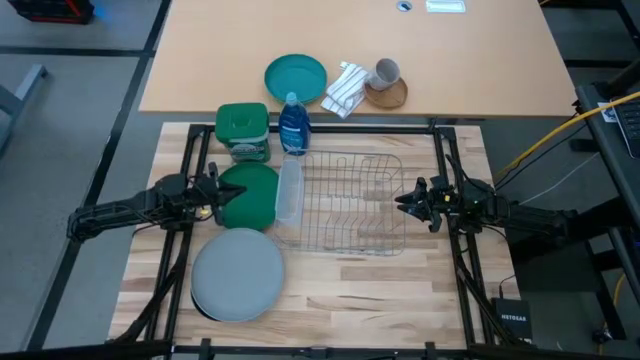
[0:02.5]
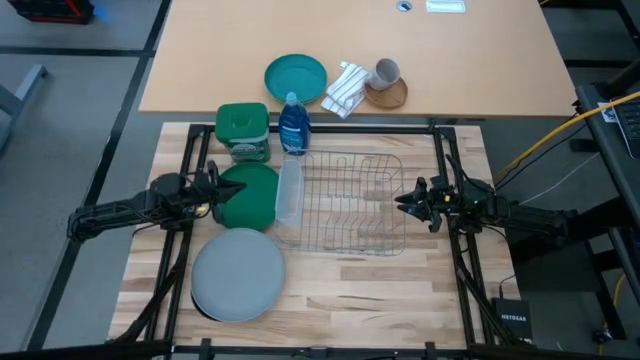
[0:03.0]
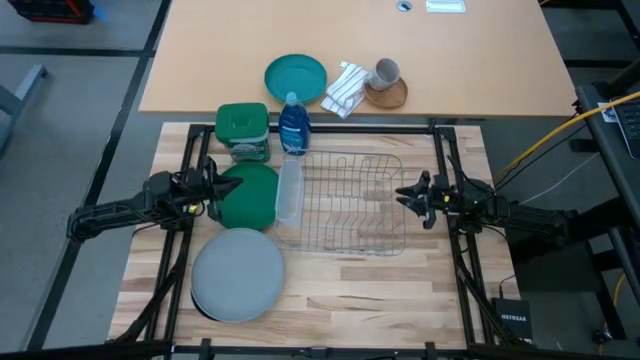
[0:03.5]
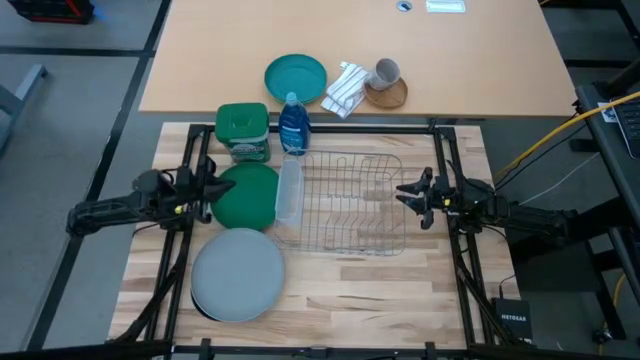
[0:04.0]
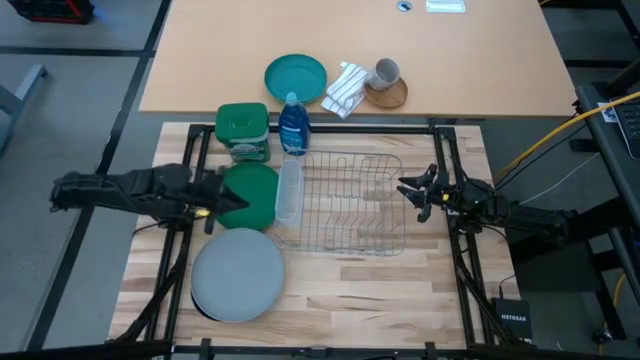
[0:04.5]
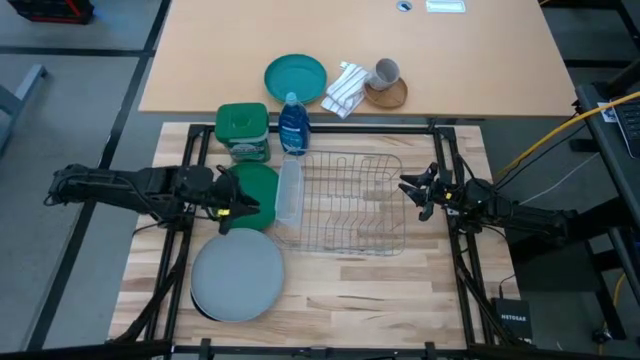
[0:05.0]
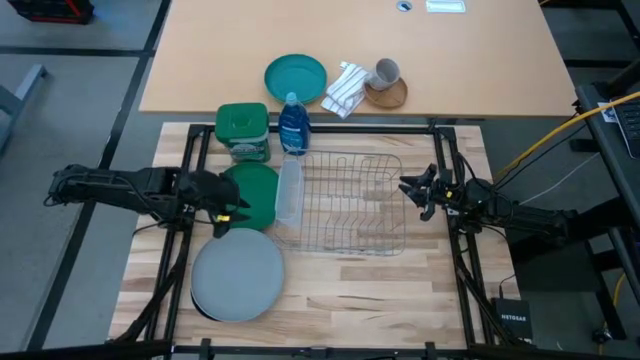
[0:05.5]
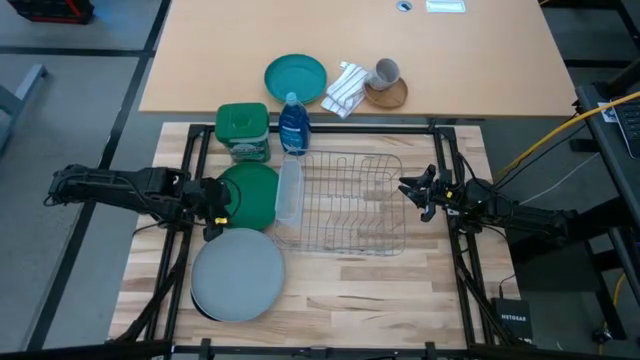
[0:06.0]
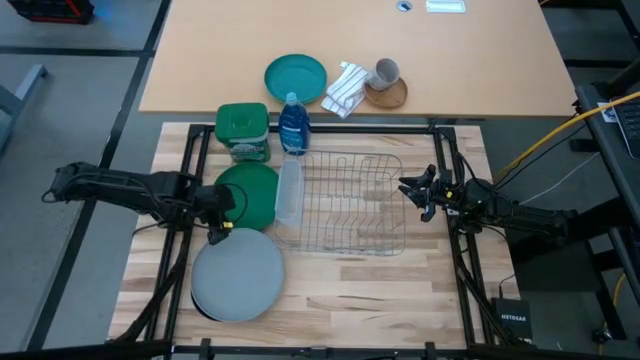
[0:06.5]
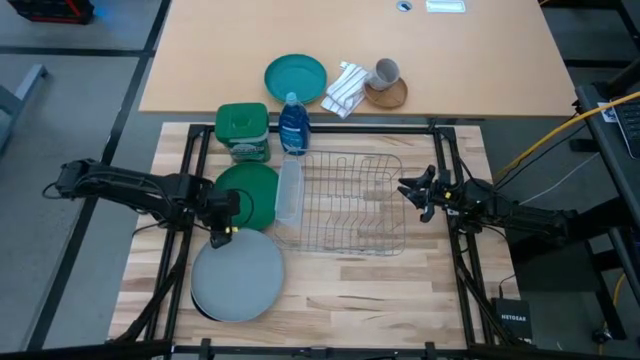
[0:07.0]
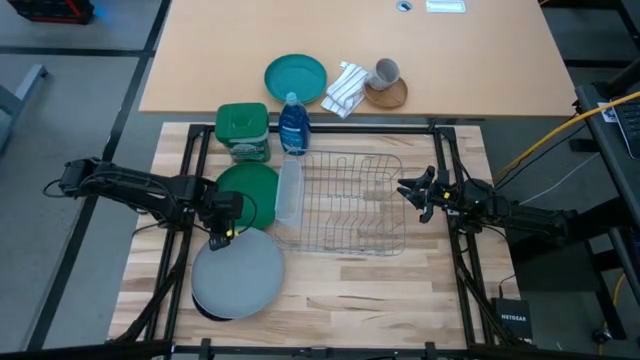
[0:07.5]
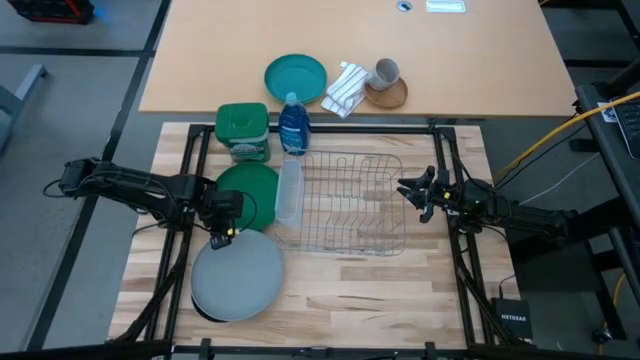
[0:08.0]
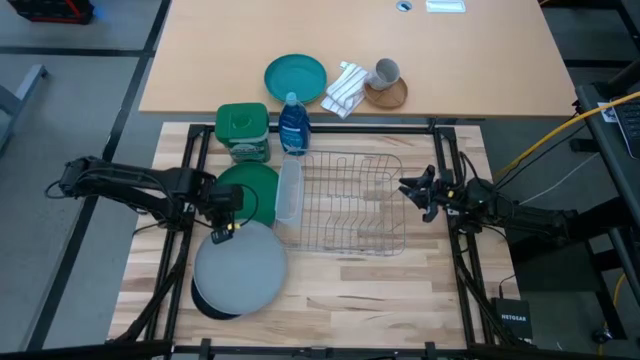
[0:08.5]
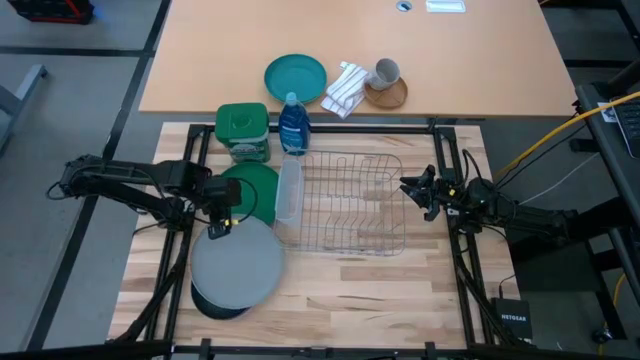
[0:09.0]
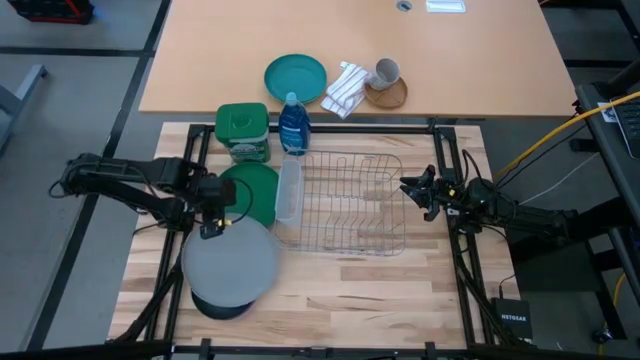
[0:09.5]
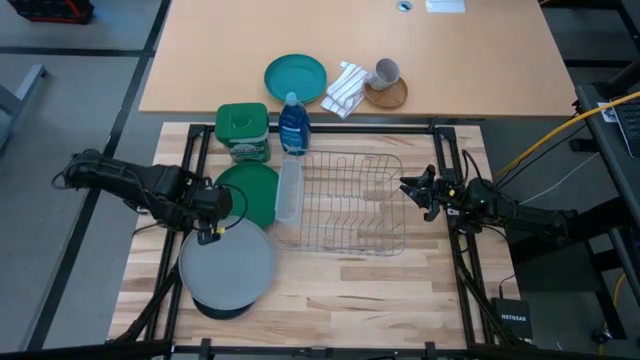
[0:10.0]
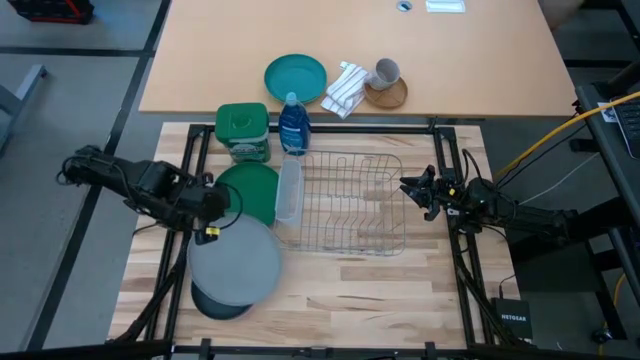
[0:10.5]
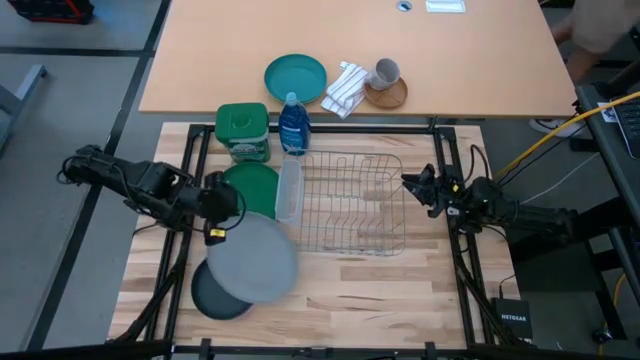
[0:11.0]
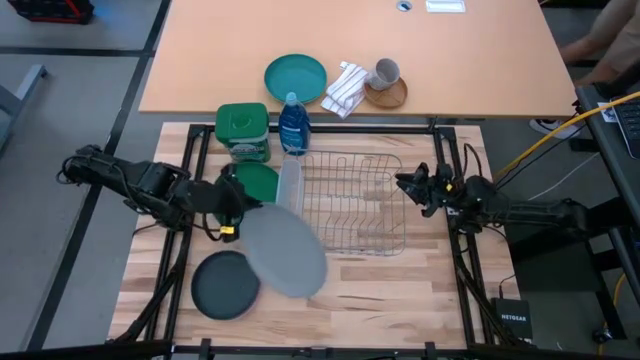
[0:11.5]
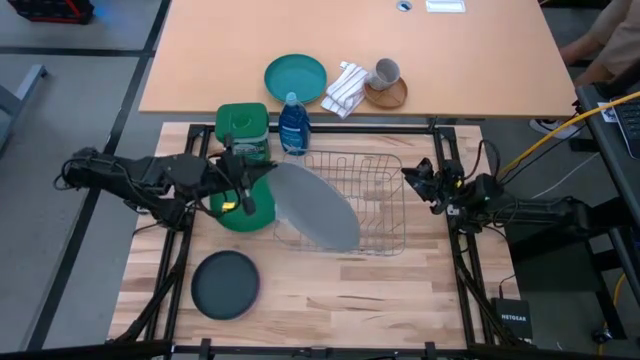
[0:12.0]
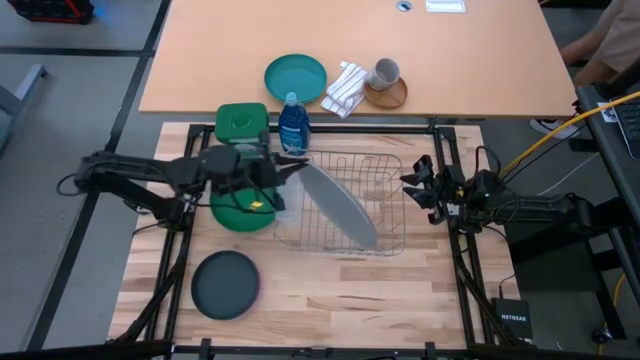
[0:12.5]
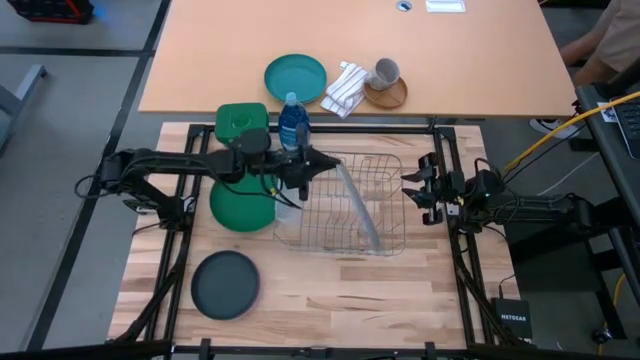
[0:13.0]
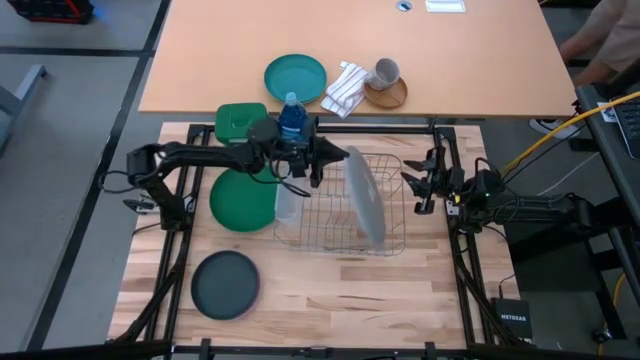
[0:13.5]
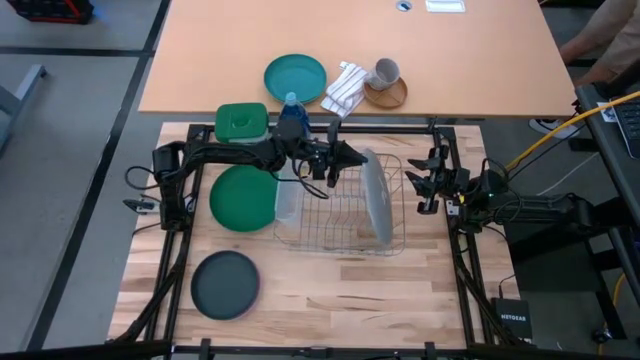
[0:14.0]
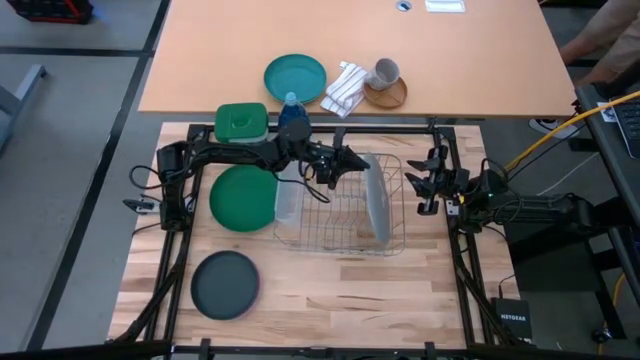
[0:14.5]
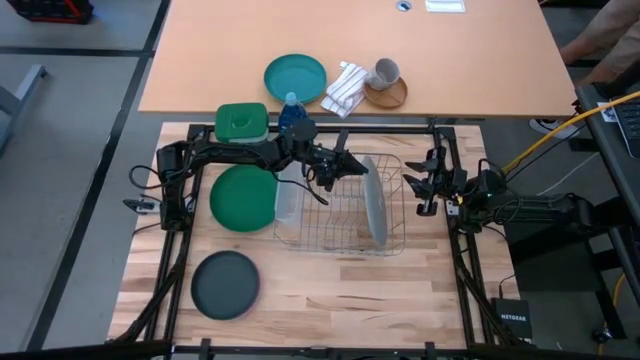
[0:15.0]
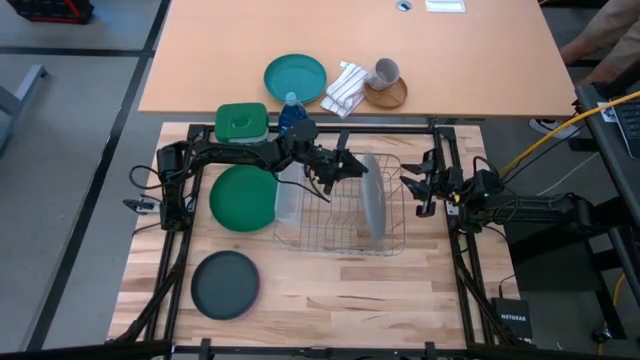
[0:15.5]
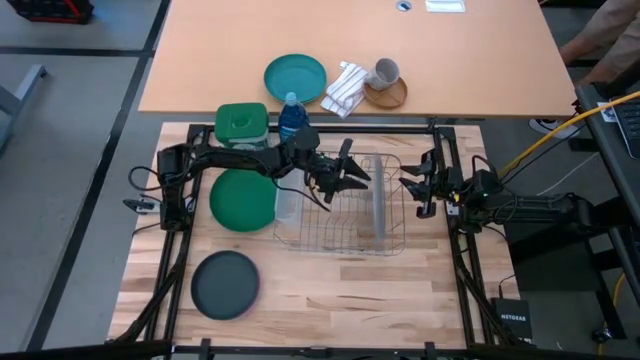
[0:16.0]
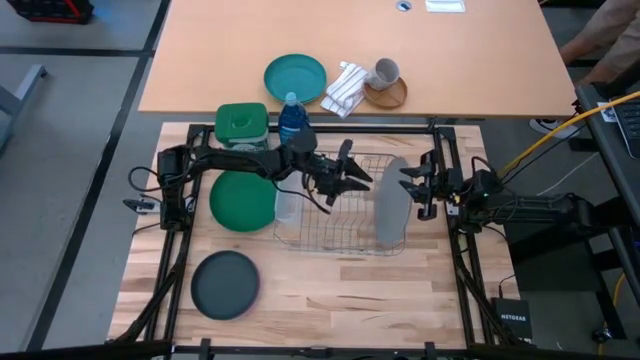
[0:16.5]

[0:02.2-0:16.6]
Task: Sort dishes
Put the gray plate into the dish rack
